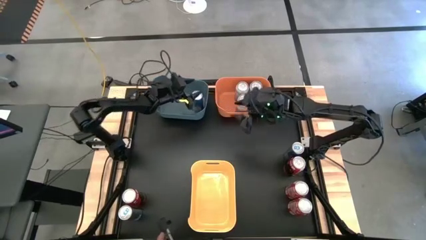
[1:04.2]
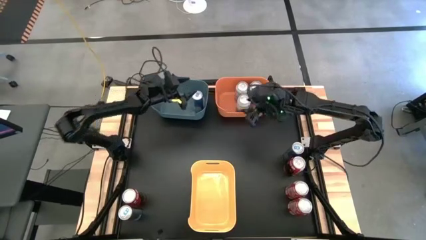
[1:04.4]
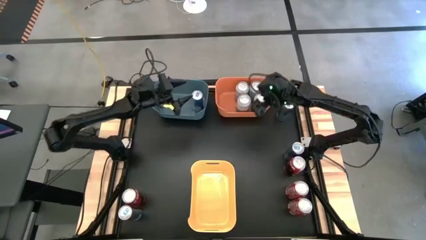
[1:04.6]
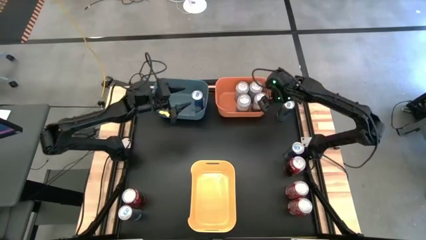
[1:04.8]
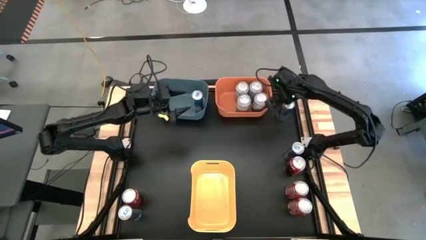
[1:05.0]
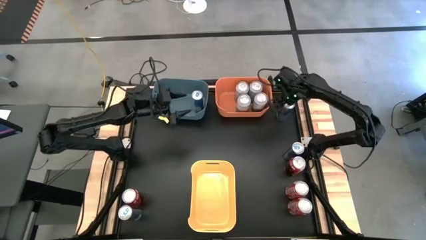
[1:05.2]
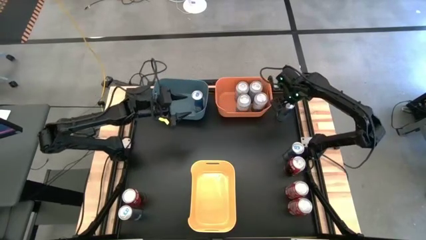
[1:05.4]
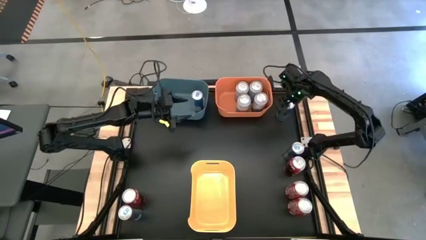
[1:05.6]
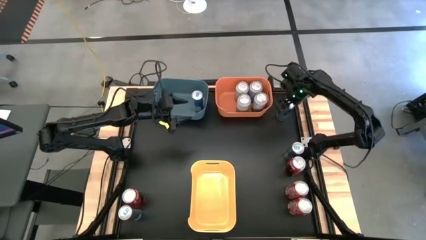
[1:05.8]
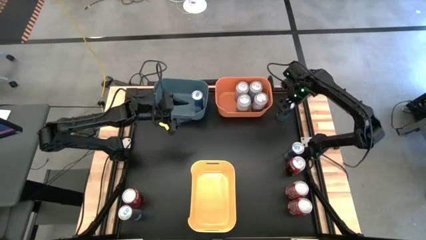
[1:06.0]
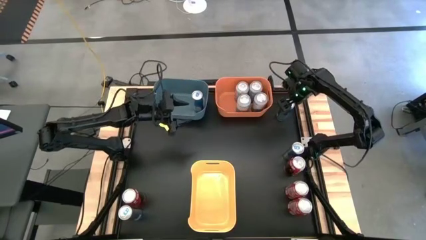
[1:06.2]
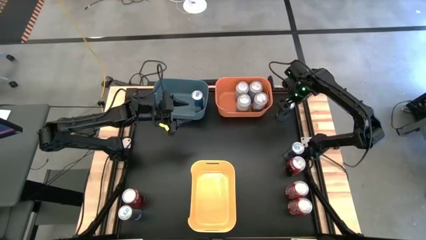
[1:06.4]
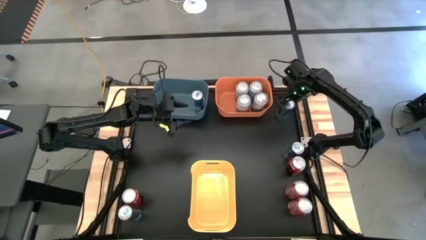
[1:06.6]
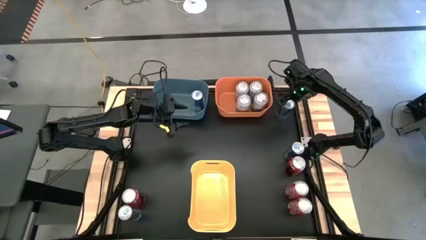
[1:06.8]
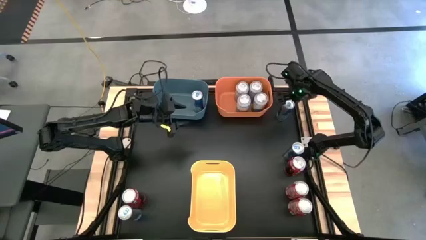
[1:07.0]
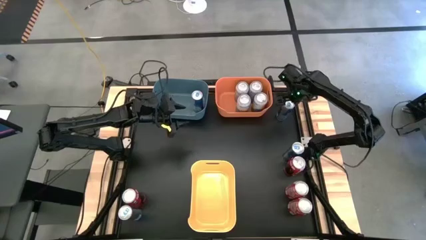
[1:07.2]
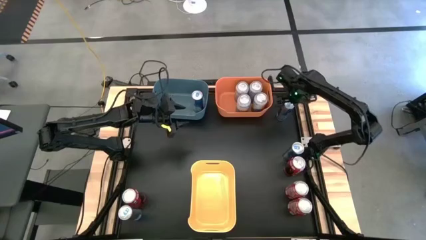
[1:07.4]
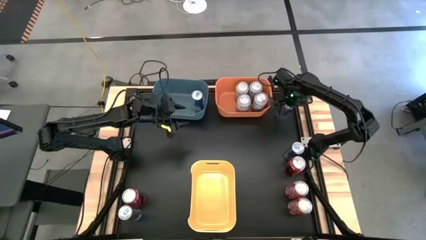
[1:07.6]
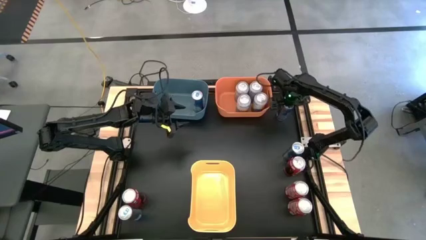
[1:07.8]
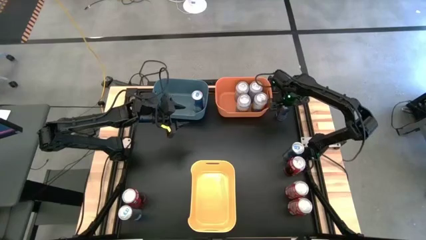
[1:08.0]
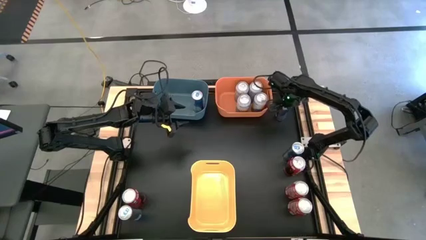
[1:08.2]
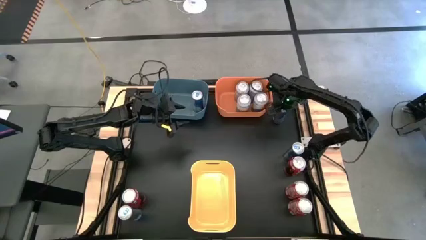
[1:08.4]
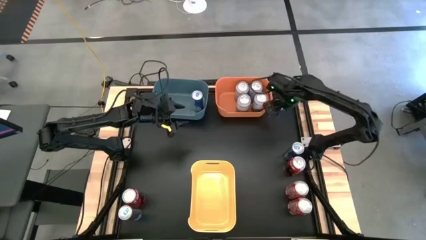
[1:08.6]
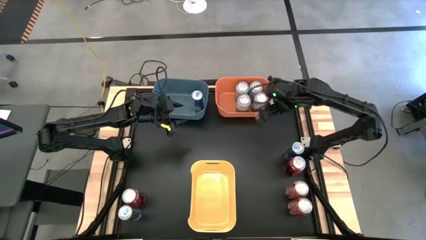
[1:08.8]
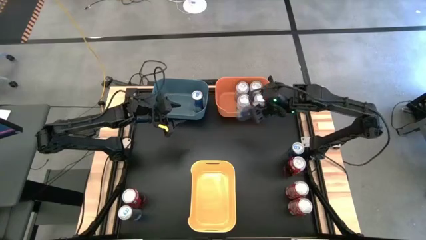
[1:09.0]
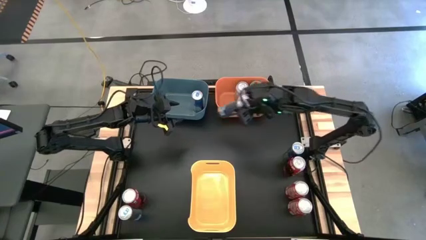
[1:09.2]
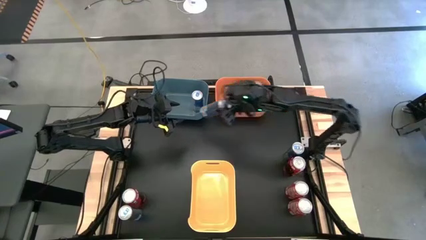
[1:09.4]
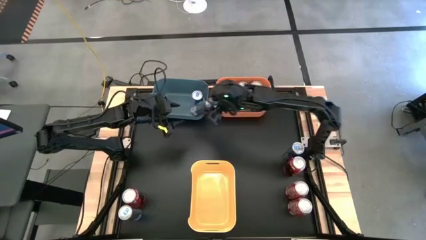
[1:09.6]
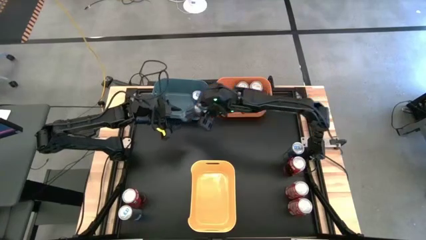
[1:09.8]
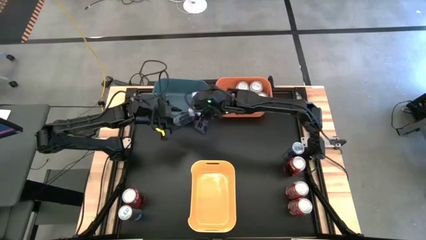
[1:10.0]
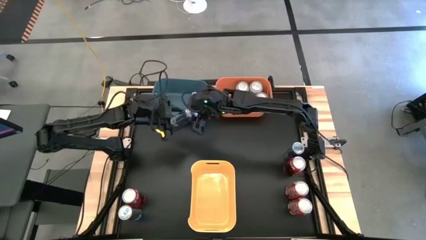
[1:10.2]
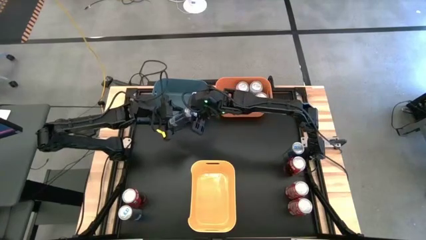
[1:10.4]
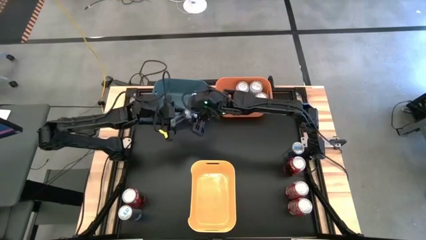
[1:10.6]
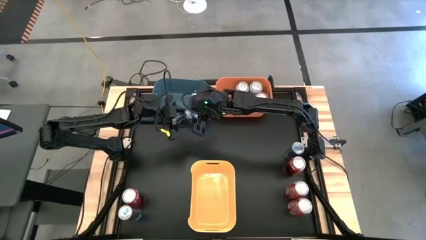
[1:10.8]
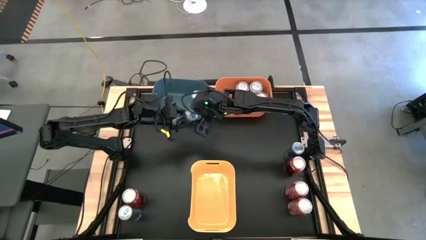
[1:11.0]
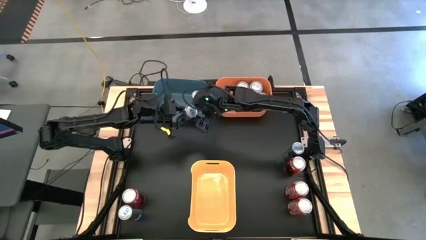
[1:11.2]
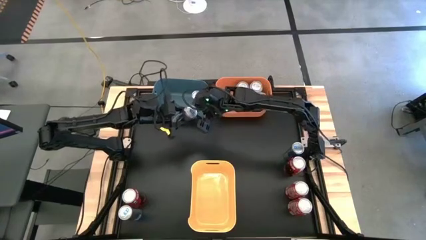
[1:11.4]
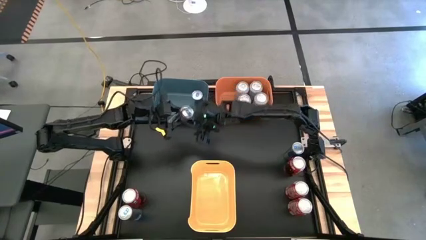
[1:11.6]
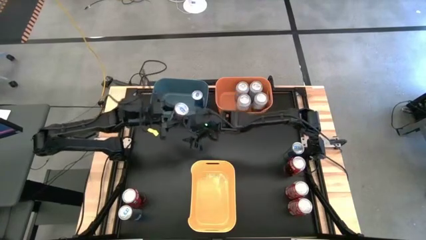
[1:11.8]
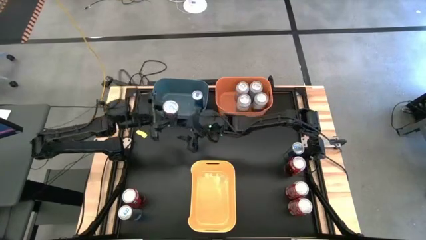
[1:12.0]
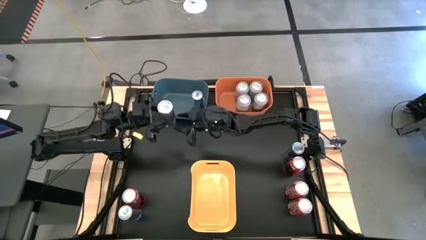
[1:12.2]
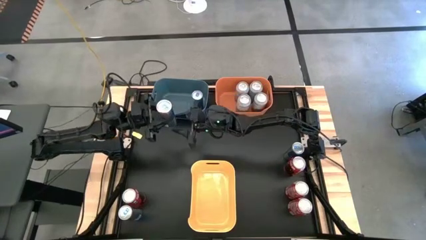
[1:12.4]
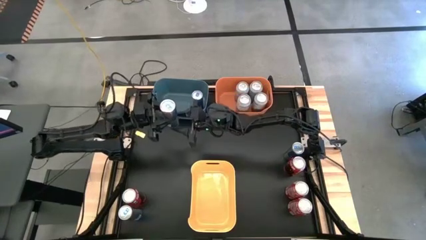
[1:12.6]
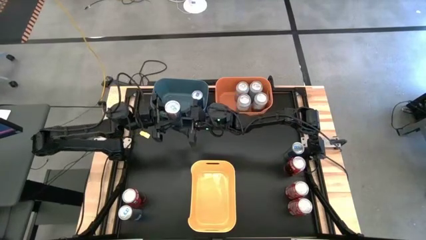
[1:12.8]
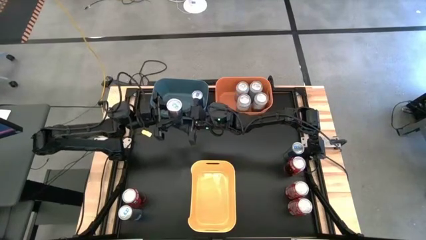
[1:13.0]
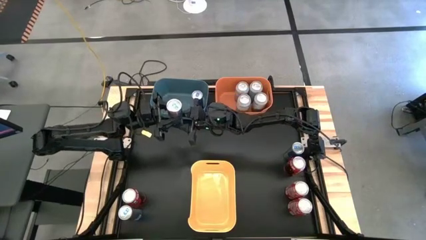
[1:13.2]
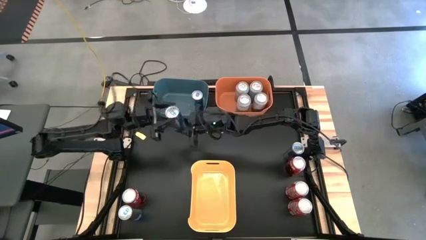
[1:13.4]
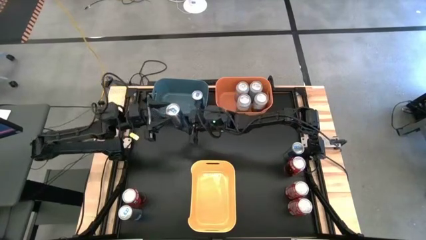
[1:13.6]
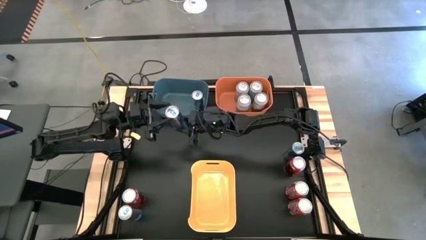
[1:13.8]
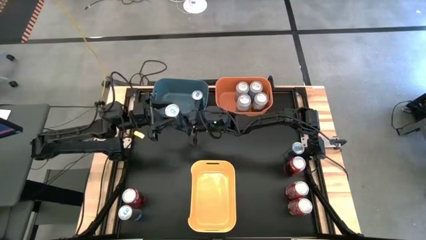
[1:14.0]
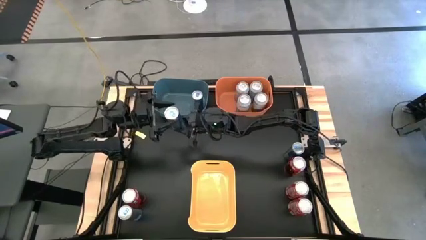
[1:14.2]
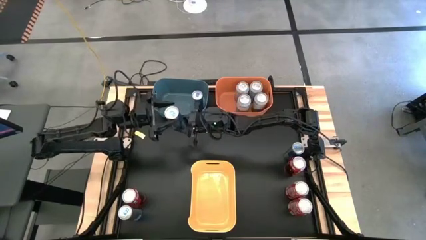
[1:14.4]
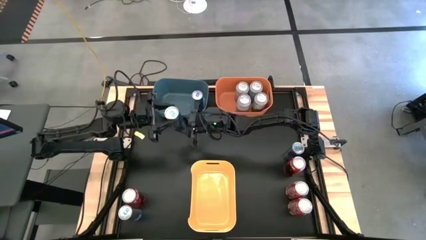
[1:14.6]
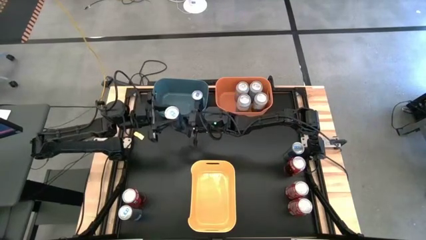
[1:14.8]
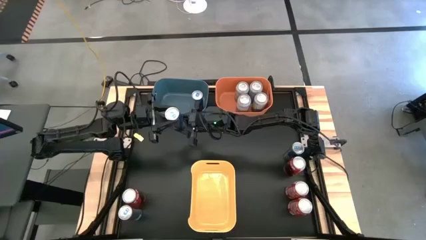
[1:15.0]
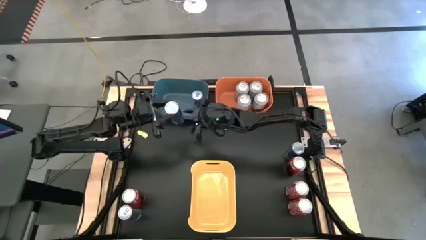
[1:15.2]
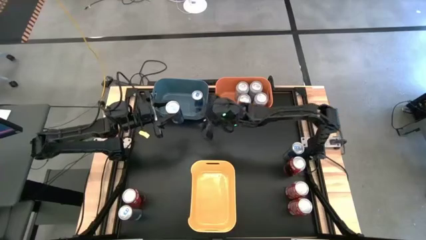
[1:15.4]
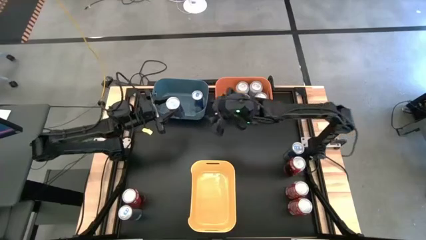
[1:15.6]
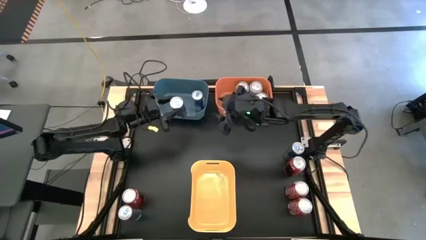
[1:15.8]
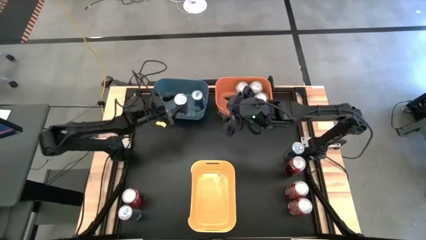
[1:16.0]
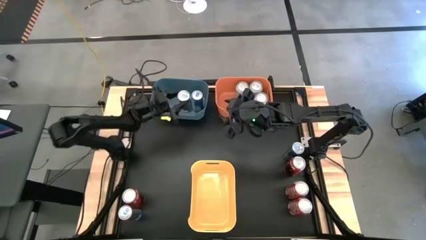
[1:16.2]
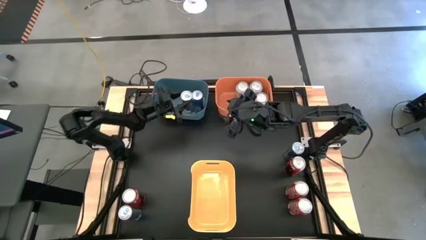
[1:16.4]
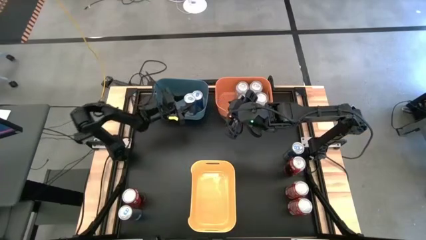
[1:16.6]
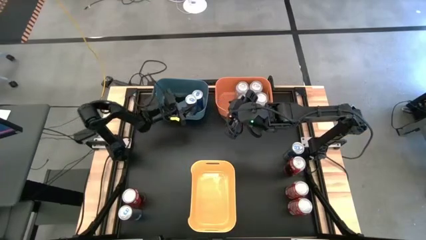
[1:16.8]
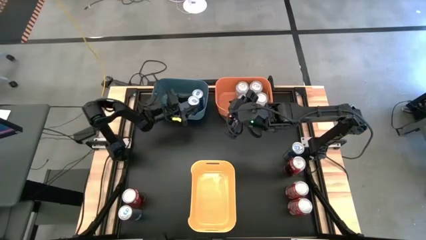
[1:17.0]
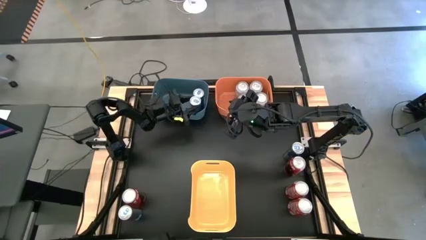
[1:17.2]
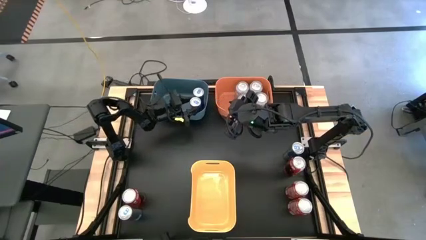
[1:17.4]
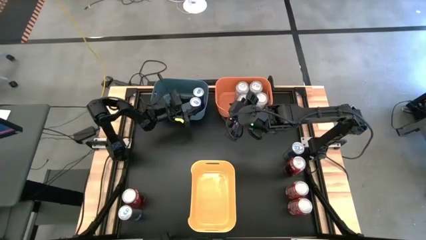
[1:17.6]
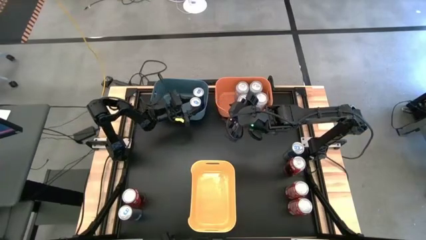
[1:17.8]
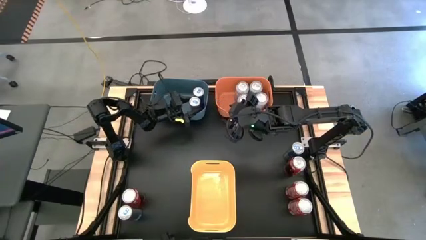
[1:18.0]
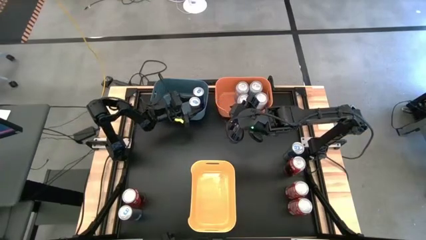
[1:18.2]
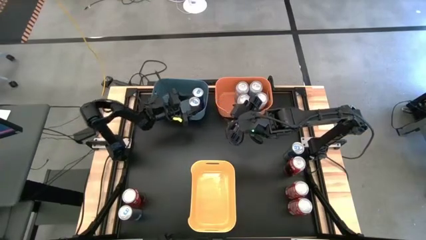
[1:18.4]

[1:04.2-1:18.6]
Task: Sort soda cans
Put the blue soda can into the blue bin
